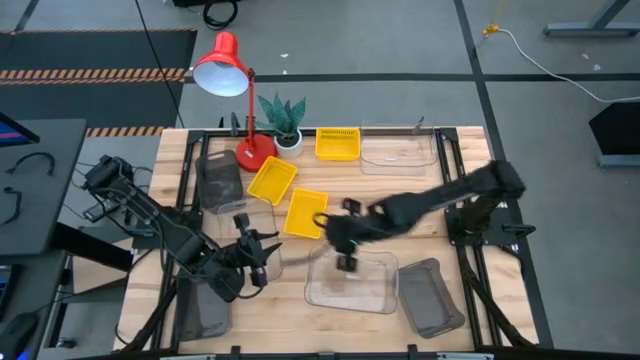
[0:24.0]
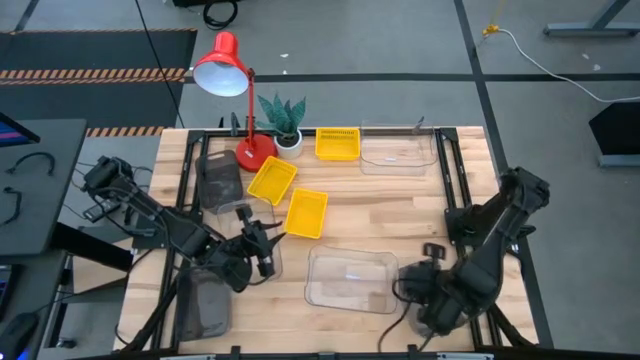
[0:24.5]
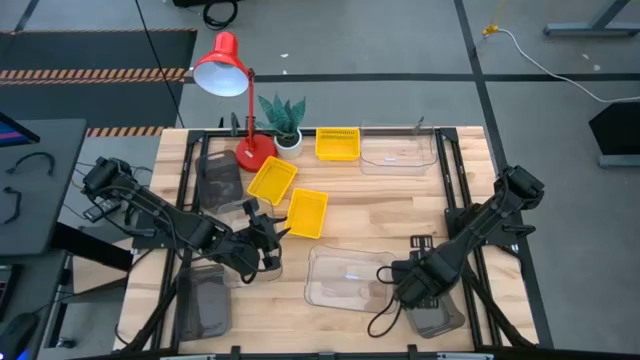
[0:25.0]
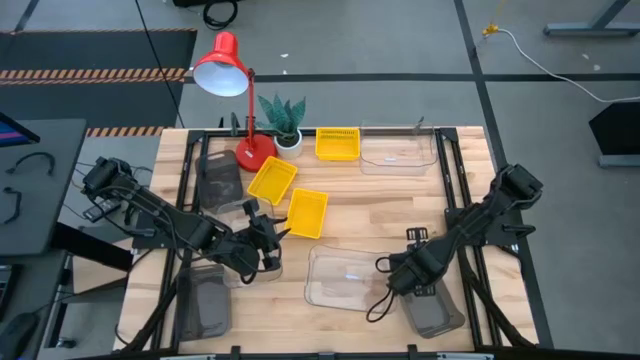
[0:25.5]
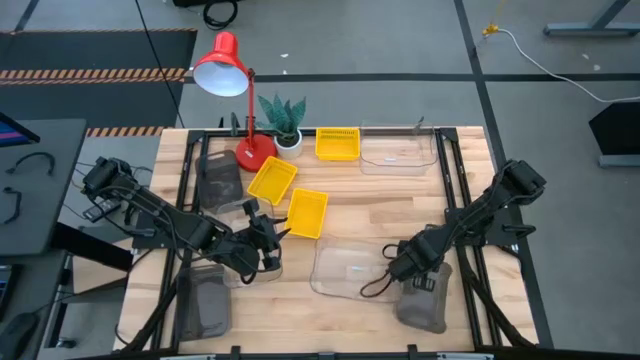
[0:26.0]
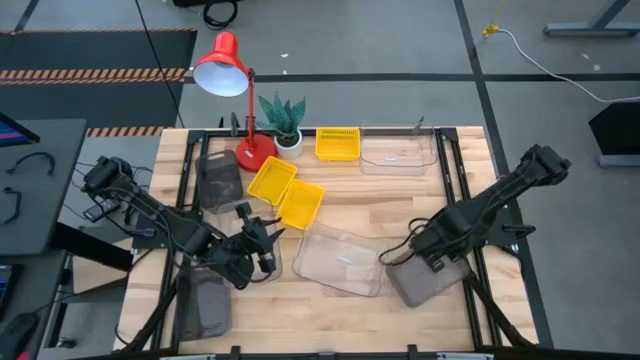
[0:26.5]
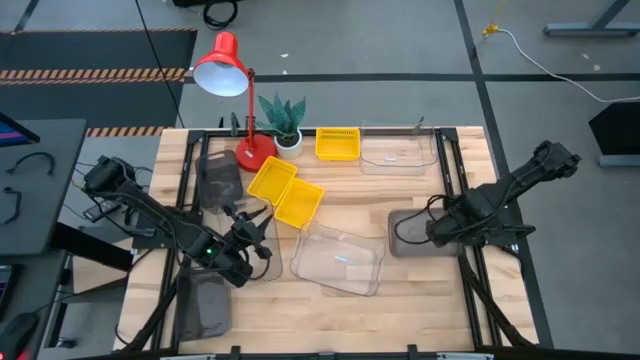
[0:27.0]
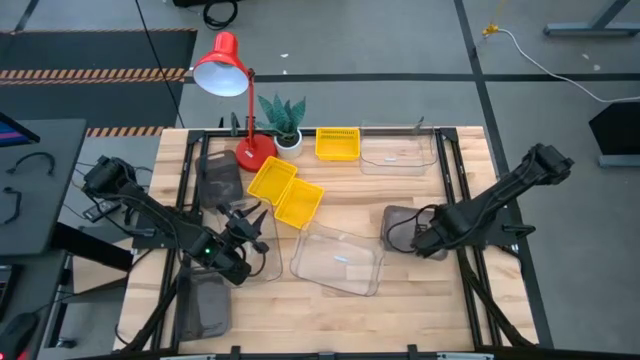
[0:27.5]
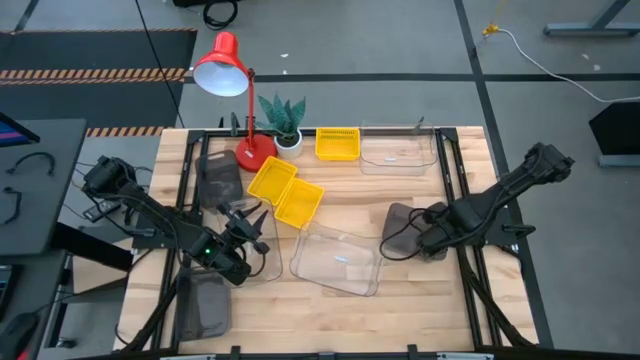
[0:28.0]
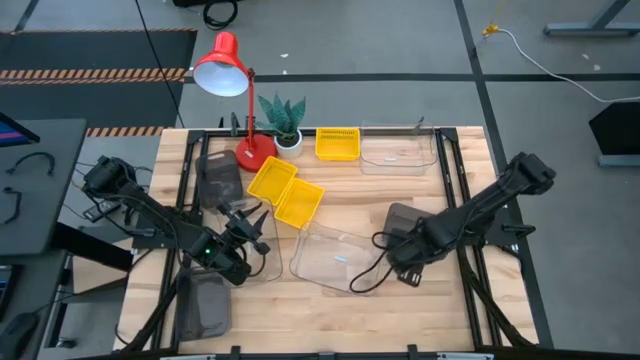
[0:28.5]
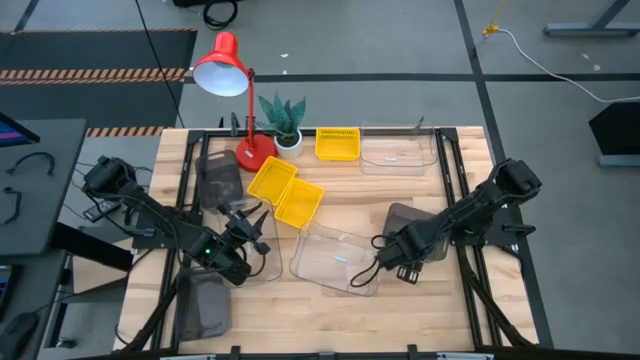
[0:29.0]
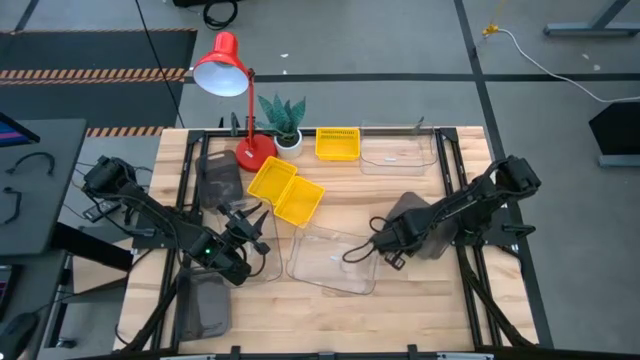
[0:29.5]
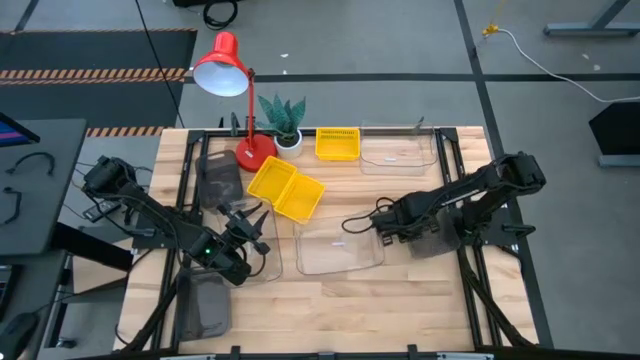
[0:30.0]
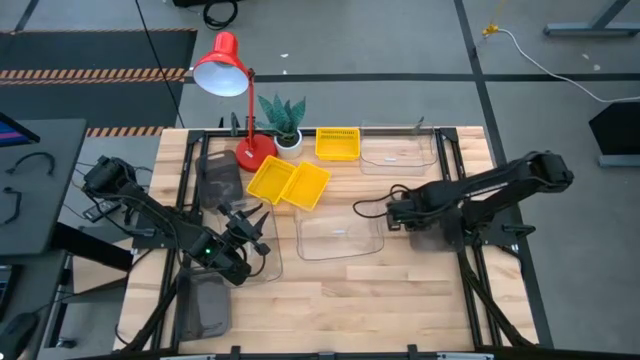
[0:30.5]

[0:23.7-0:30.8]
Adjust the bottom right black transparent bin on the table

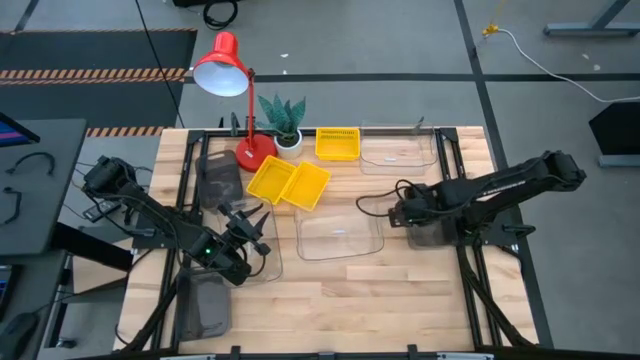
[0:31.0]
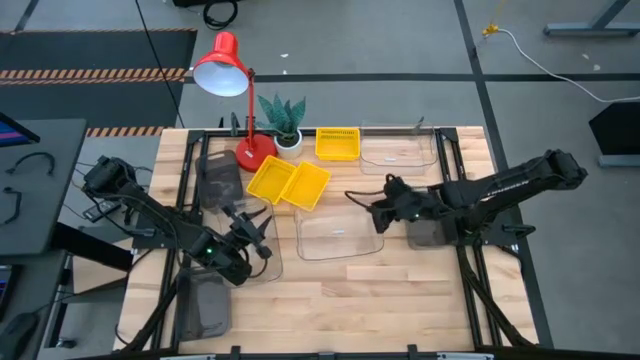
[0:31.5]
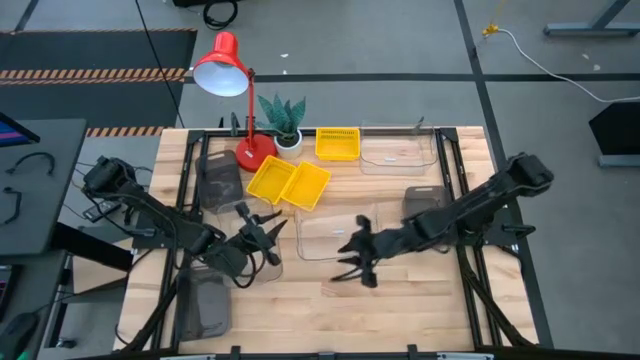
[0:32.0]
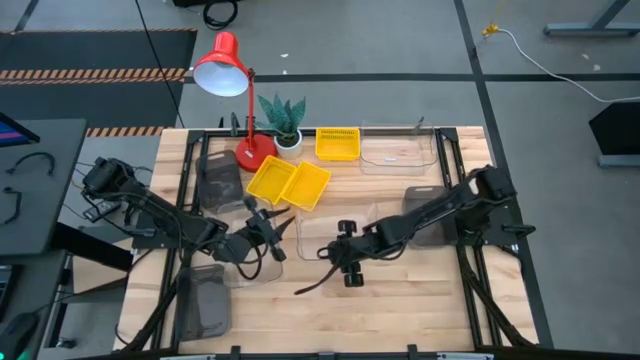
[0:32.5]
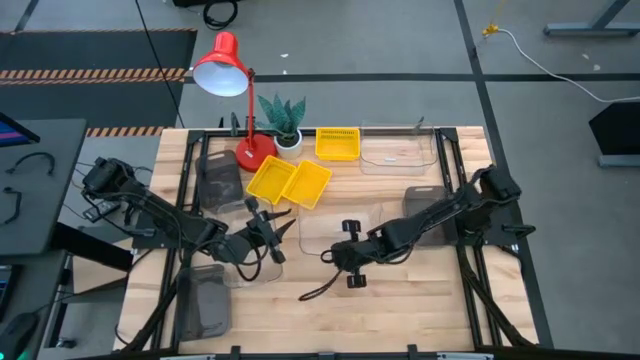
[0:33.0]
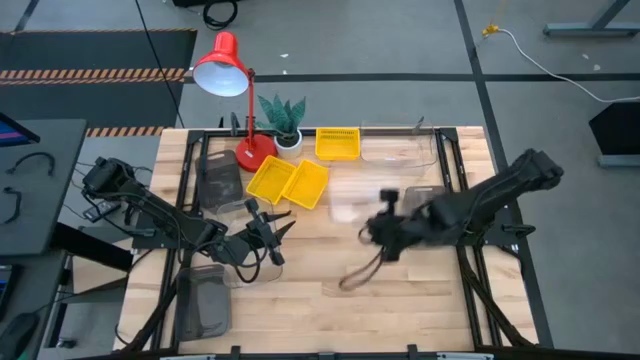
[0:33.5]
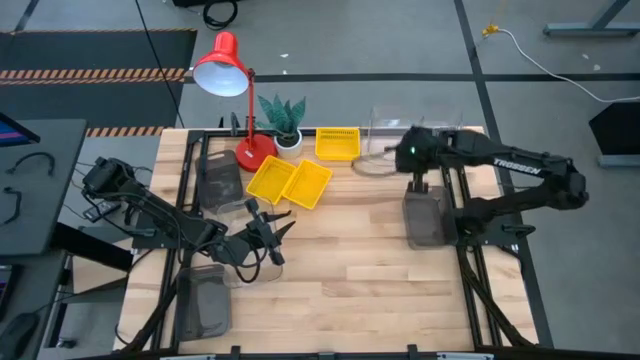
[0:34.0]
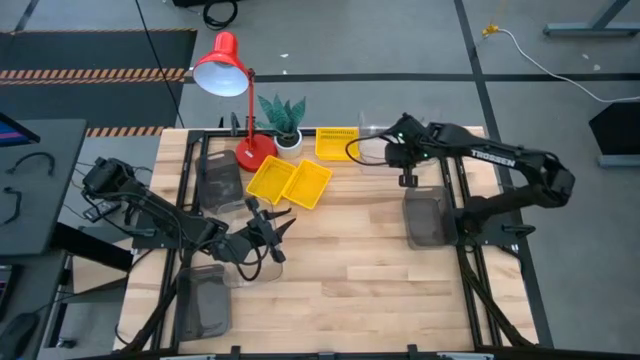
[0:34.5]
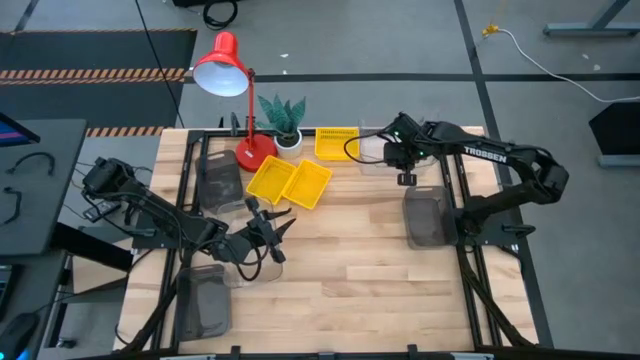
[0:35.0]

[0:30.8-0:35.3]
Stack the middle transparent bin on top of the top transparent bin

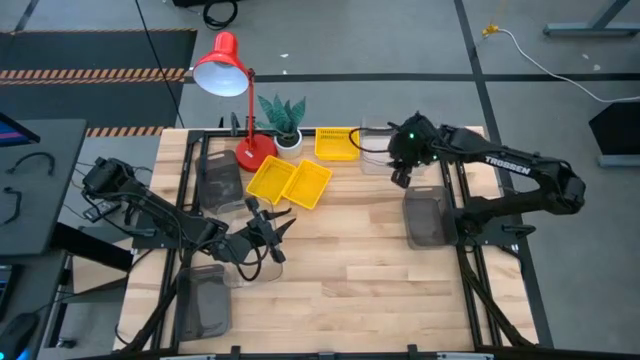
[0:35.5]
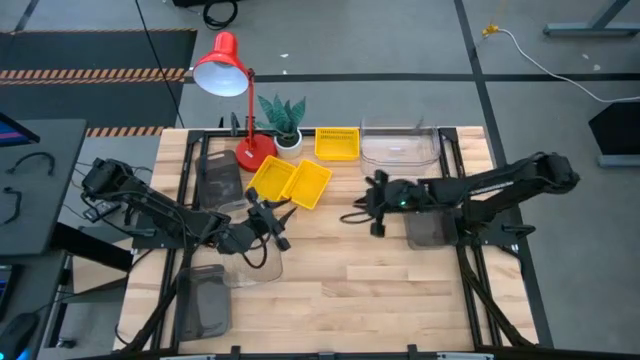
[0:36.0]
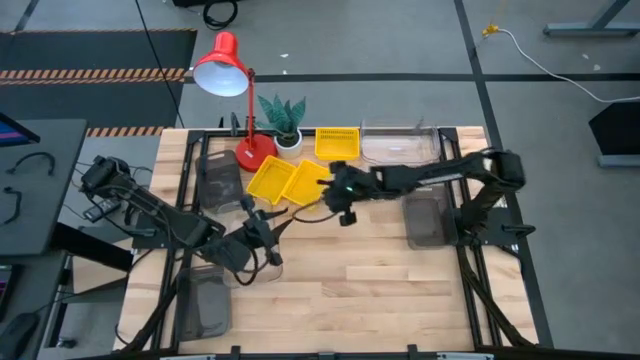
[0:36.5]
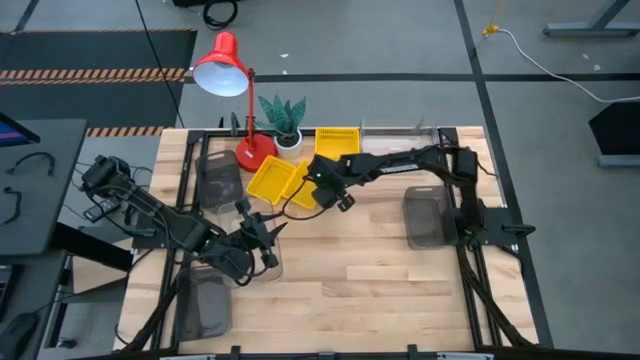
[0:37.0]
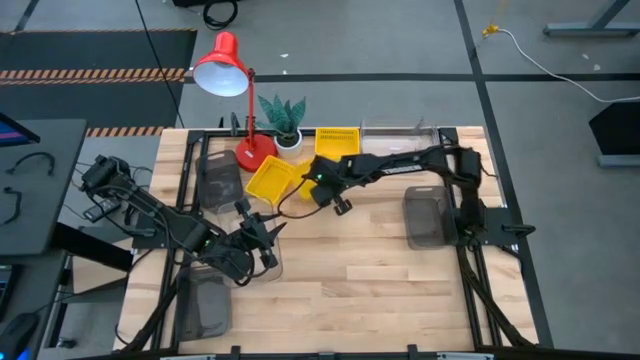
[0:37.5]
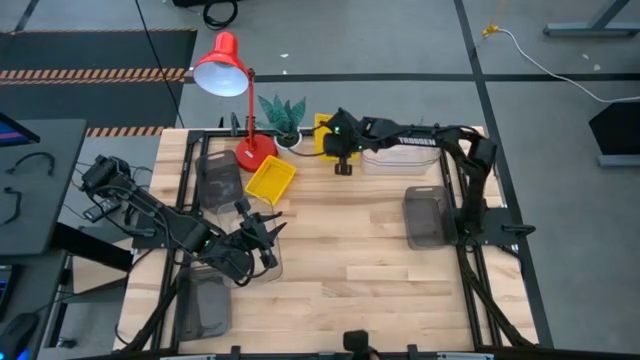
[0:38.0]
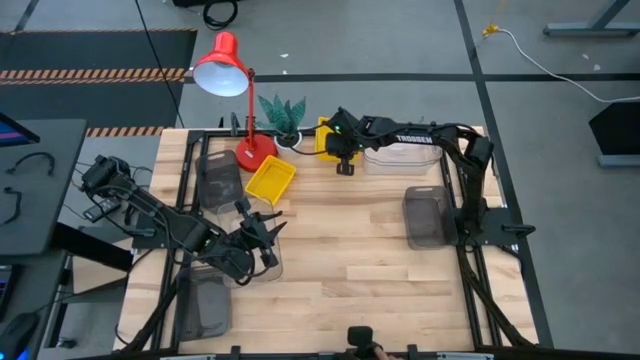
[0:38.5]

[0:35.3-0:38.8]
Stack the bottom right yellow bin on top of the top yellow bin

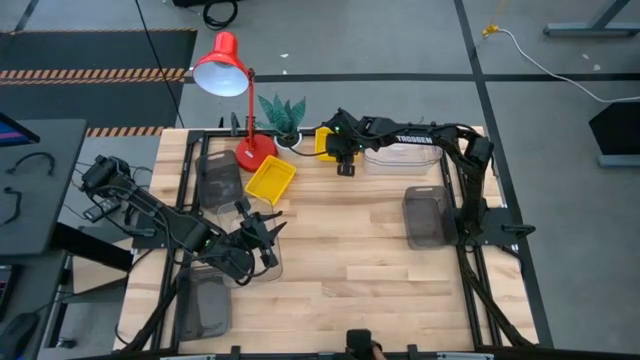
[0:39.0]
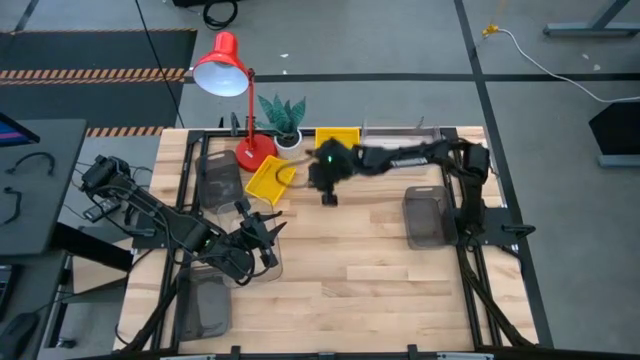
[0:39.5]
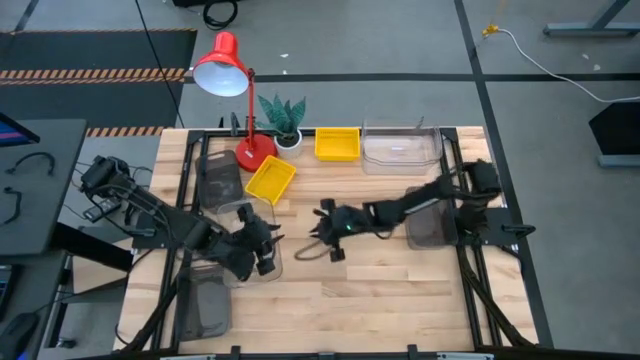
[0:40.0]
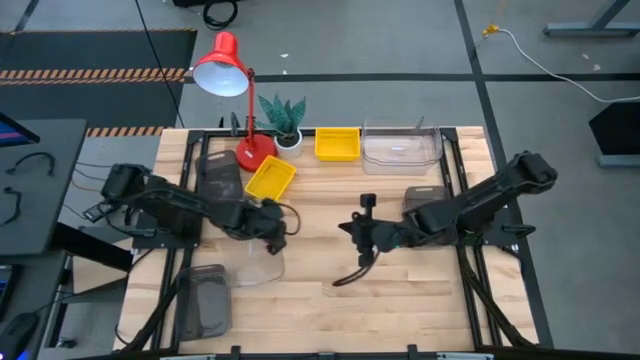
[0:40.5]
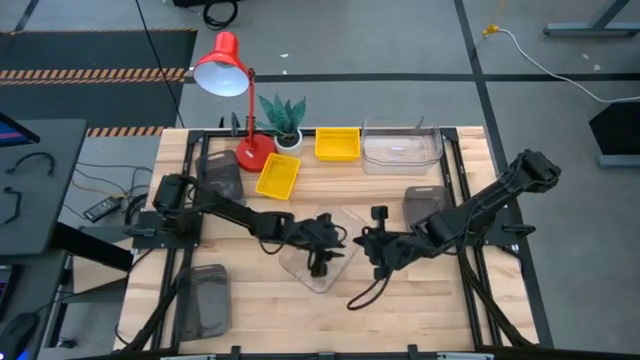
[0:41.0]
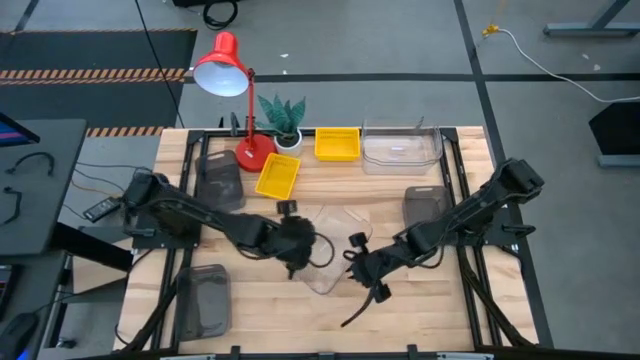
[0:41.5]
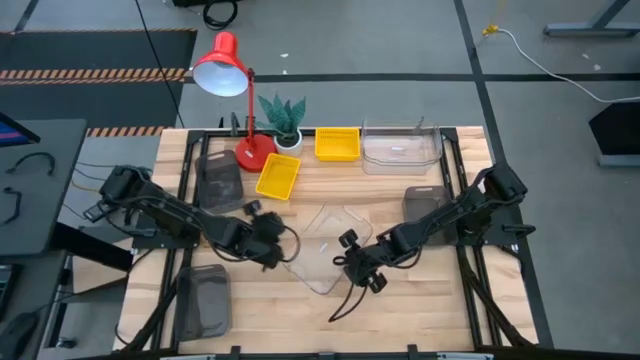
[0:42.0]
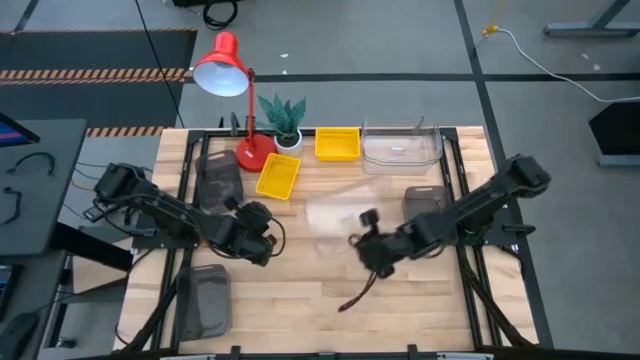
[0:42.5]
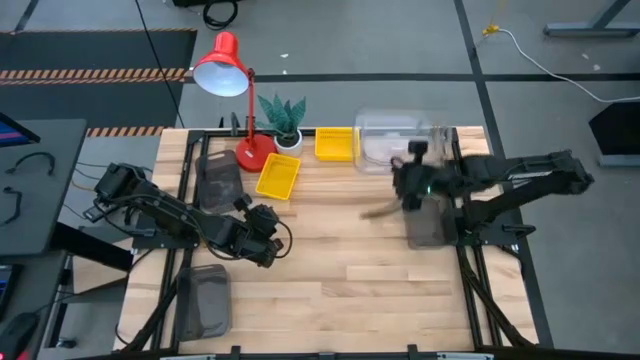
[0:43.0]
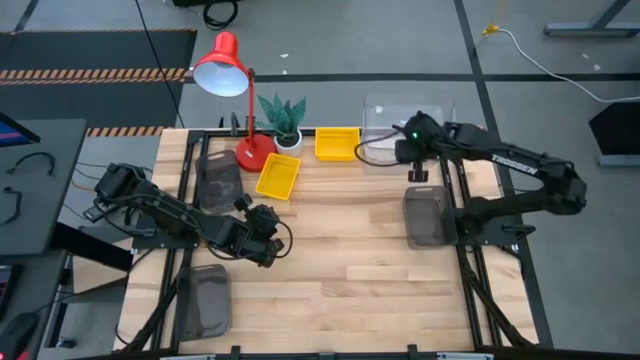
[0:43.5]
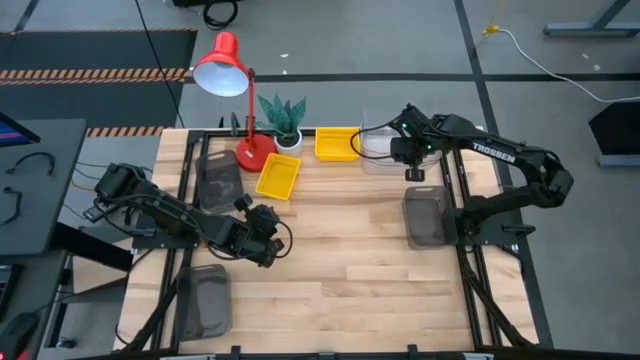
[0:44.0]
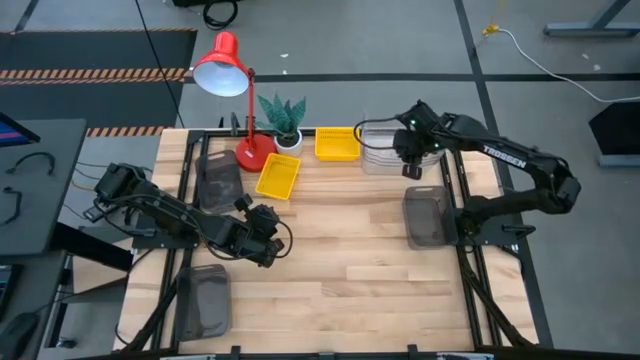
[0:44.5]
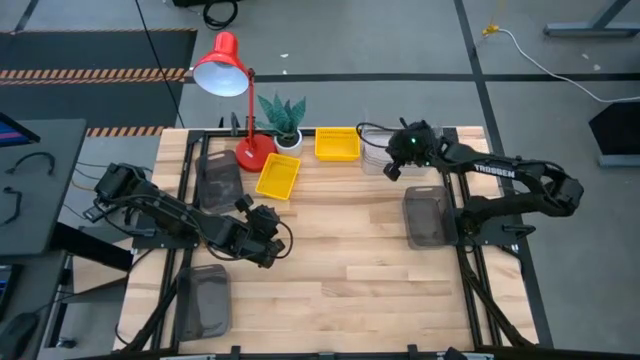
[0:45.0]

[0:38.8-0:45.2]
Stack the bottom transparent bin on top of the top transparent bins
